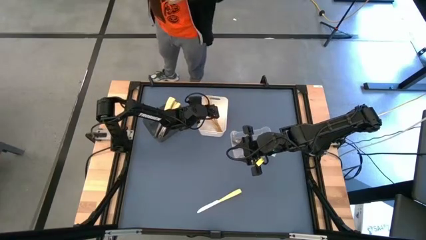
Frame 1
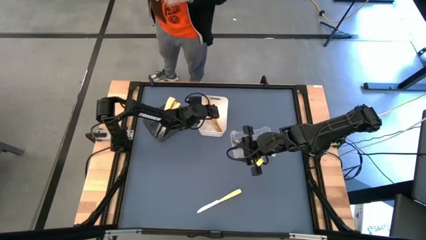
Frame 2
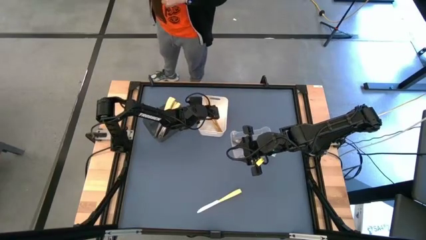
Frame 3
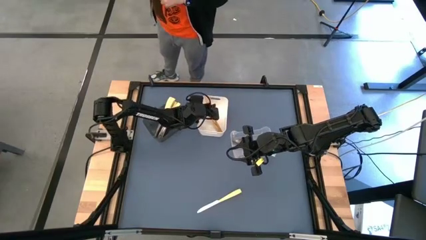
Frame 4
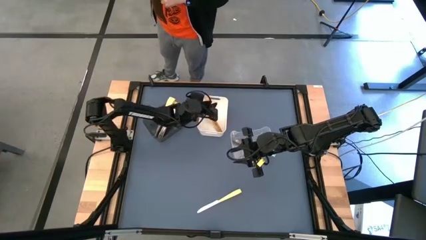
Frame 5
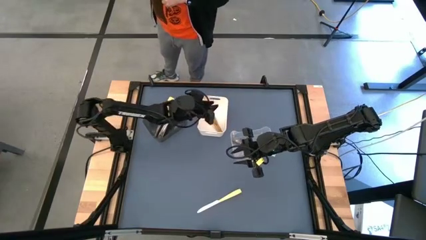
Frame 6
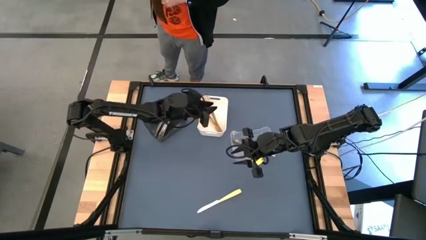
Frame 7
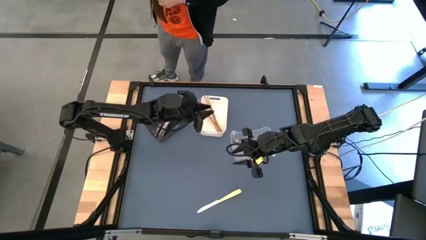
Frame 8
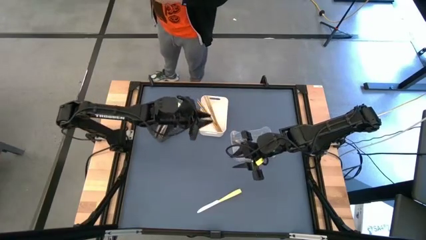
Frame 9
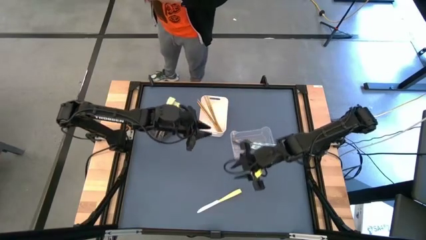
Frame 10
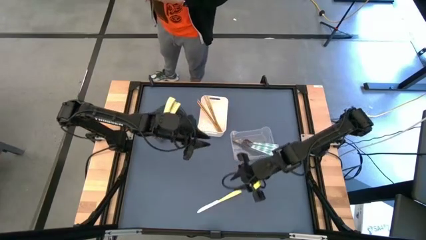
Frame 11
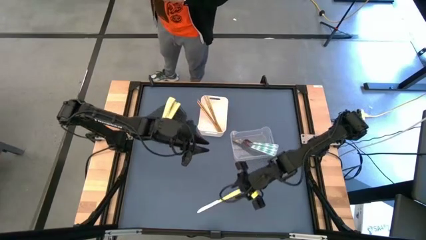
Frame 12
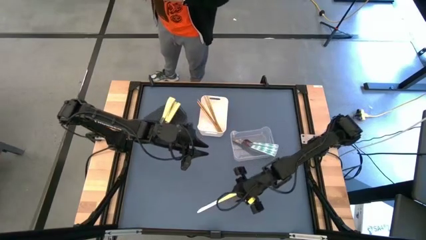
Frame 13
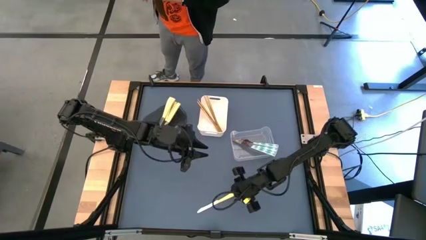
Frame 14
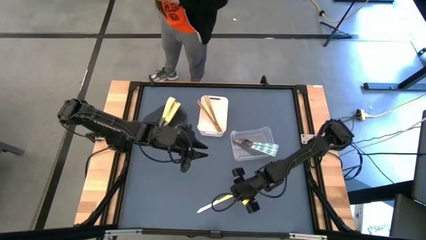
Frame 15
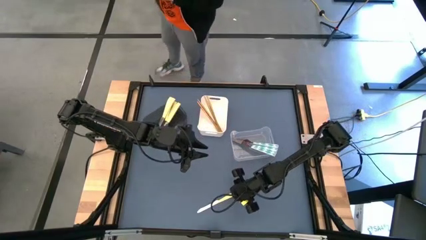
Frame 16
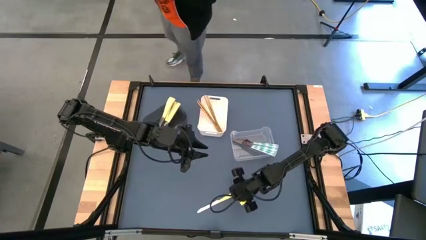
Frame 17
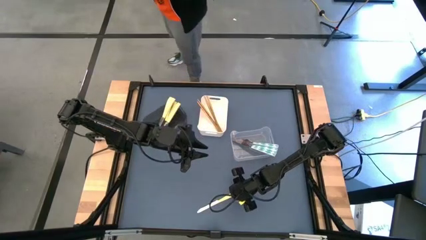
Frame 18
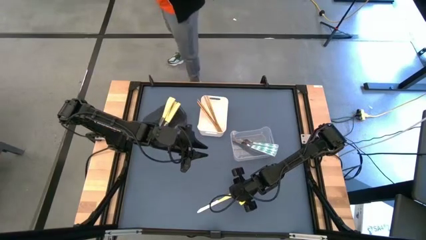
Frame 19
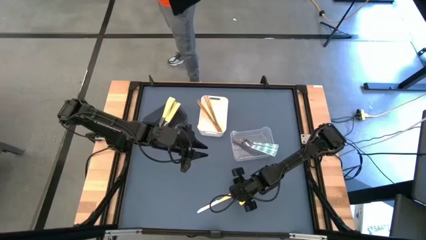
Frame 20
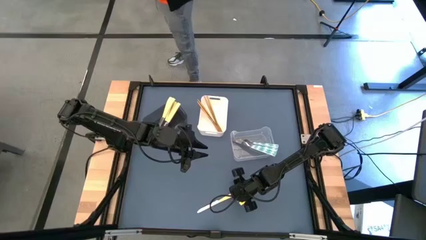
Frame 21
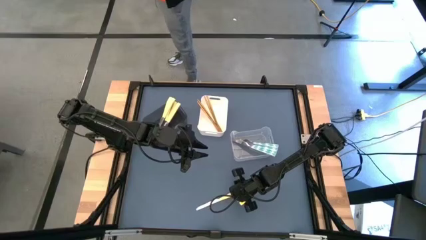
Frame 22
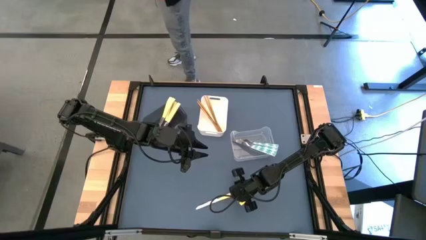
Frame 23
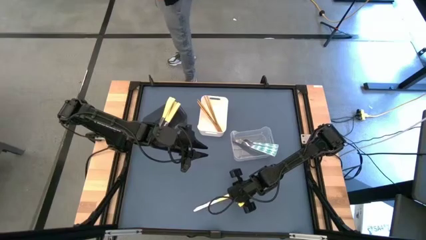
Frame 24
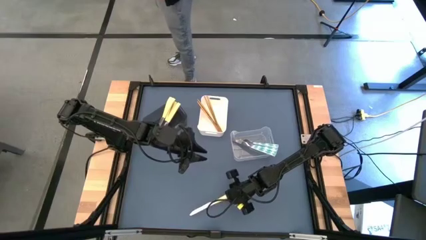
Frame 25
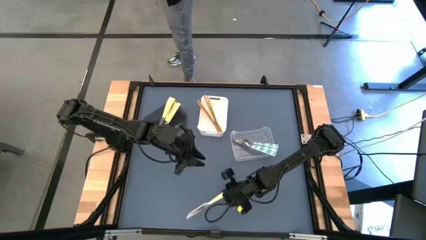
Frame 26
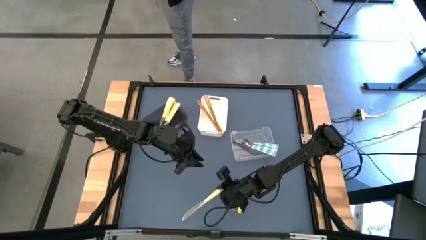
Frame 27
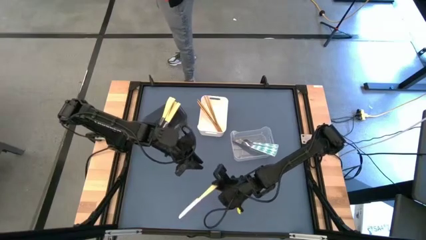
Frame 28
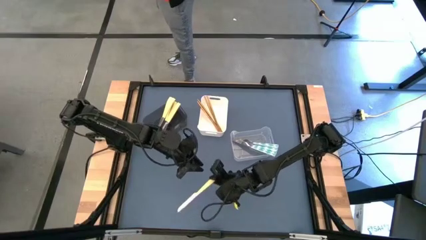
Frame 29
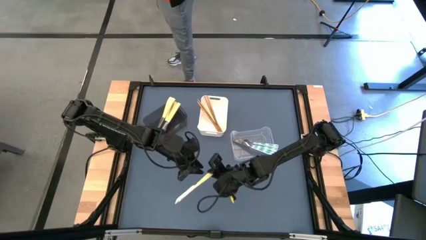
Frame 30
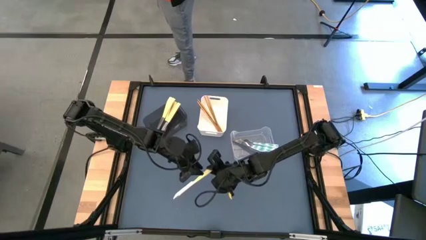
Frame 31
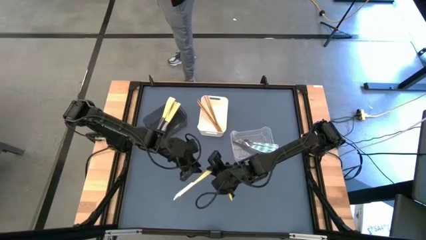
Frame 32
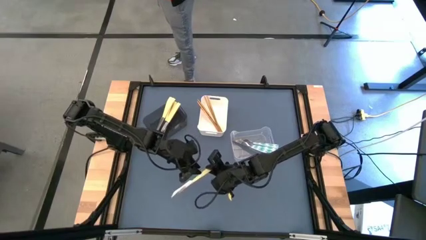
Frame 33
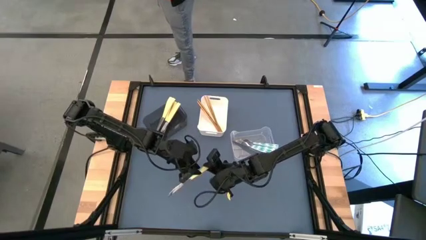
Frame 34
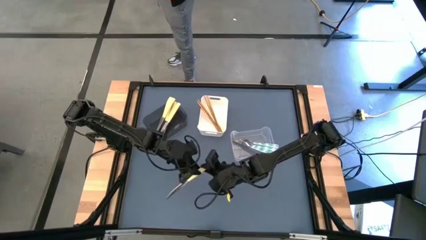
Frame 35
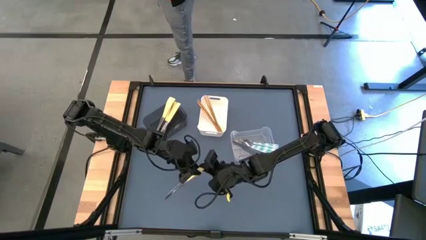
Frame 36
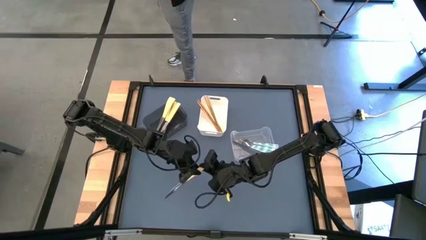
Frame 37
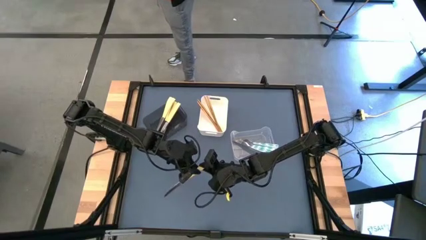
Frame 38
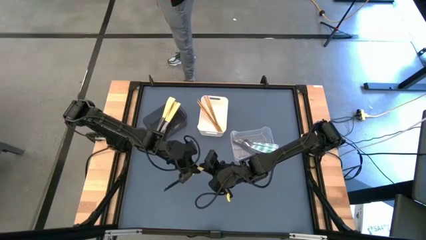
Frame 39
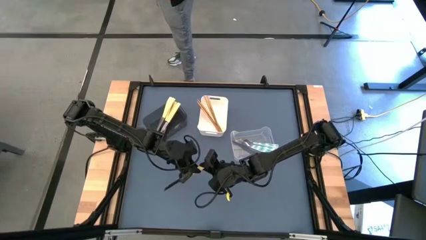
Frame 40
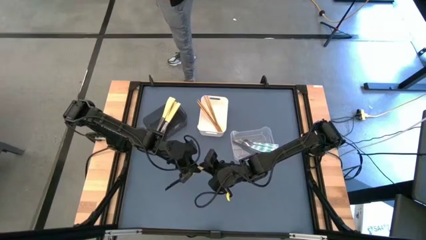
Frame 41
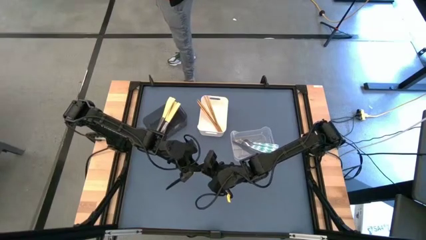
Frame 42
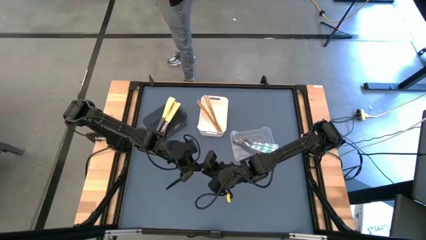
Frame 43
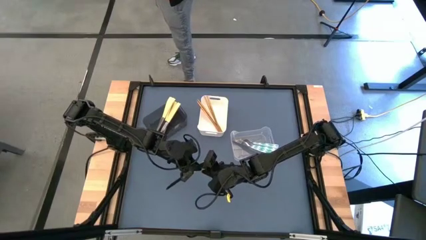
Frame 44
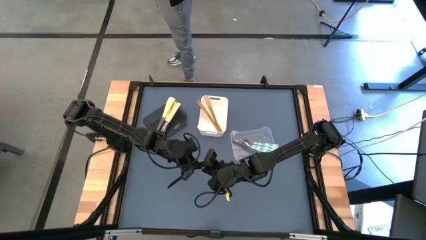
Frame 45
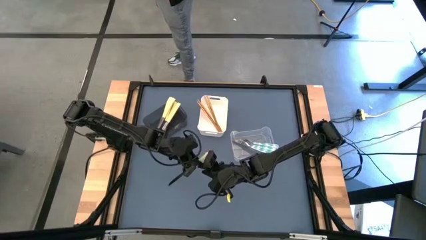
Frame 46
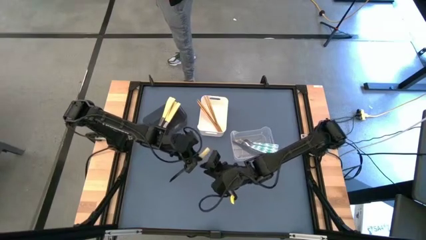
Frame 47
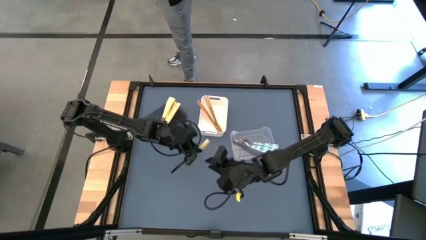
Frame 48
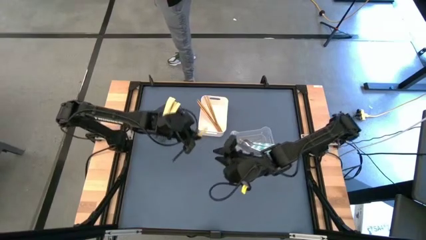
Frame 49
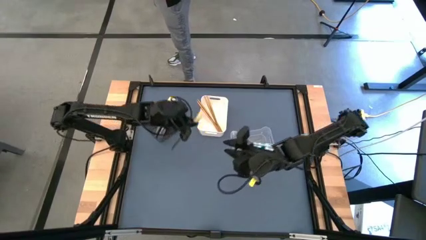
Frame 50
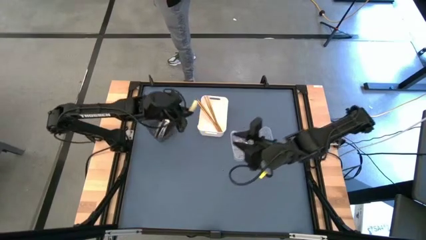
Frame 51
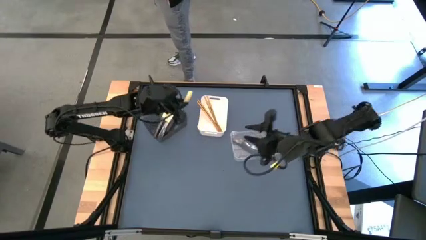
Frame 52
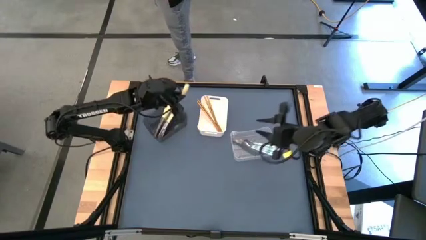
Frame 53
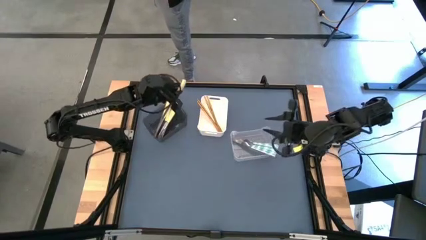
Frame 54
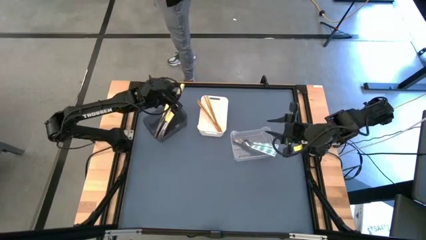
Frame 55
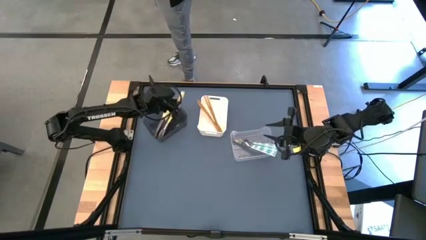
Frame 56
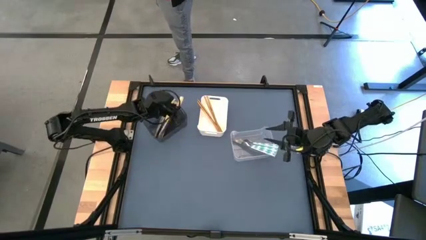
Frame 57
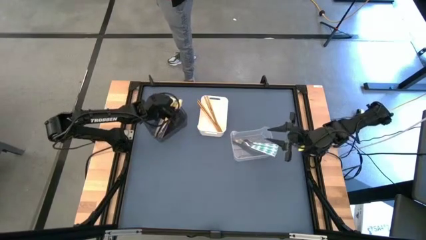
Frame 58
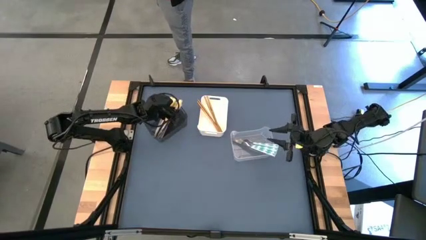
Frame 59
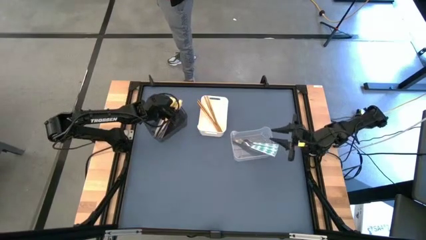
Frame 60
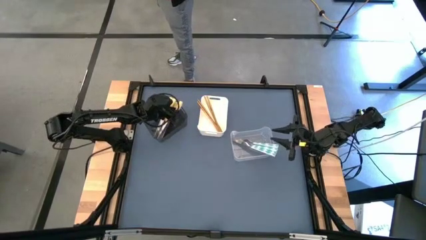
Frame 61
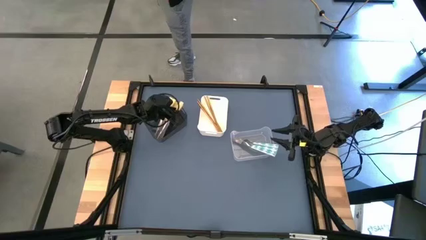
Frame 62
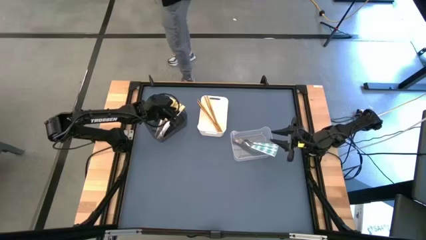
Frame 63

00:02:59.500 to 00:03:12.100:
Task: Sort silverware by color (type)
Put the yellow knife into the black bin

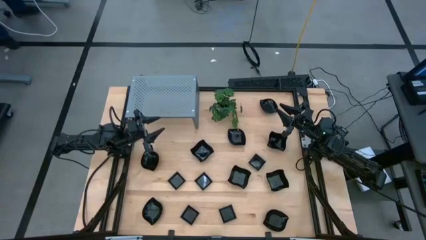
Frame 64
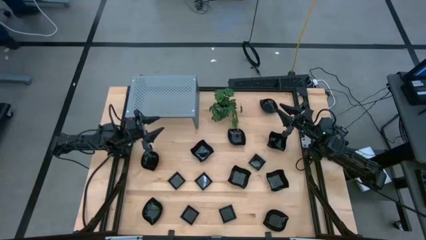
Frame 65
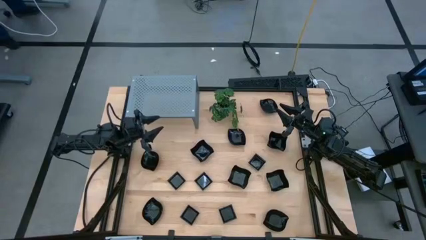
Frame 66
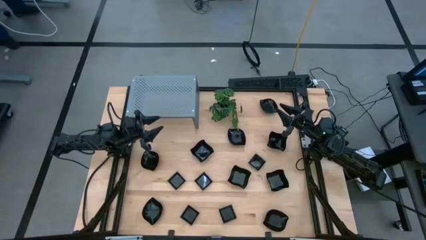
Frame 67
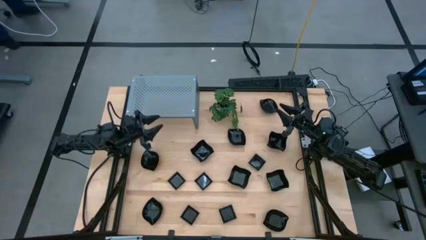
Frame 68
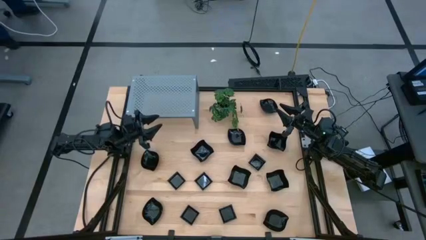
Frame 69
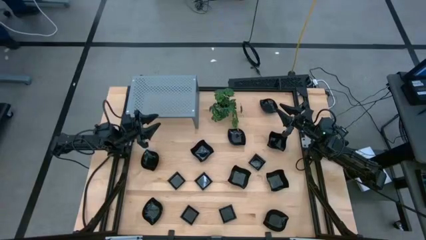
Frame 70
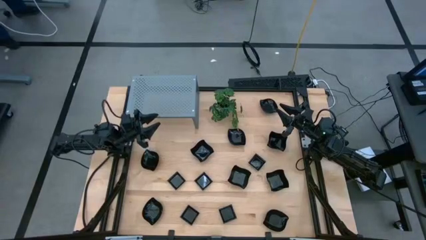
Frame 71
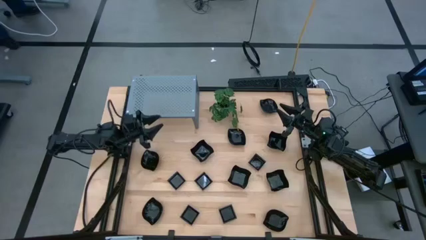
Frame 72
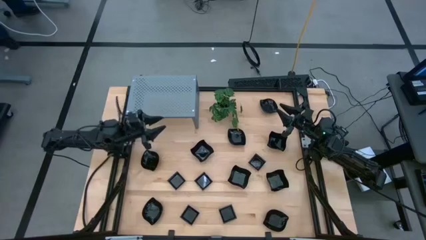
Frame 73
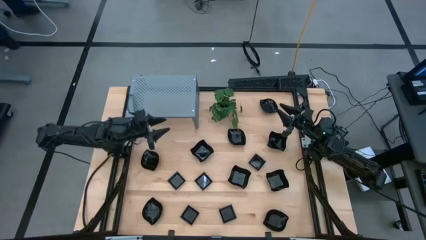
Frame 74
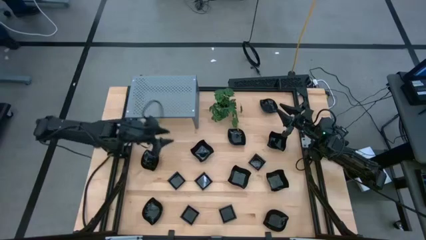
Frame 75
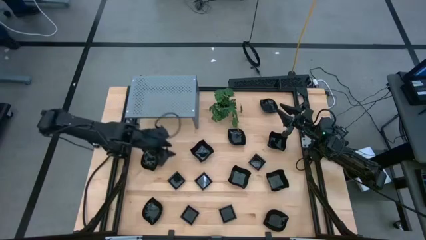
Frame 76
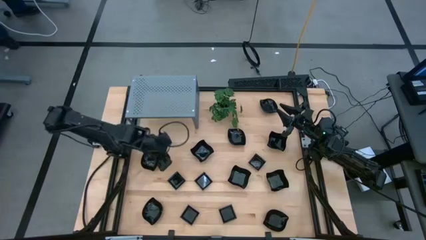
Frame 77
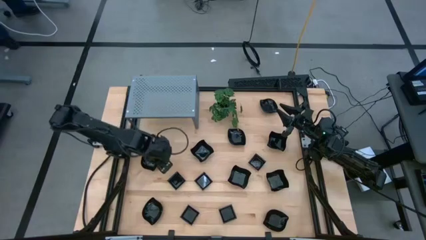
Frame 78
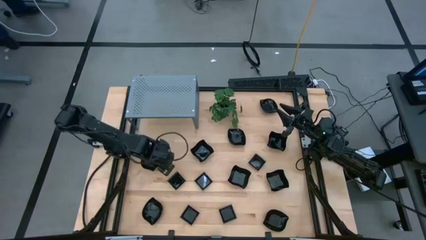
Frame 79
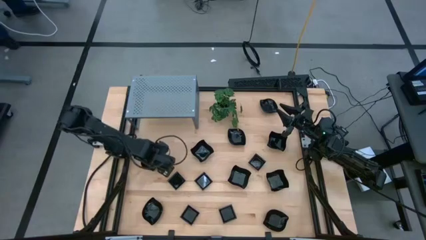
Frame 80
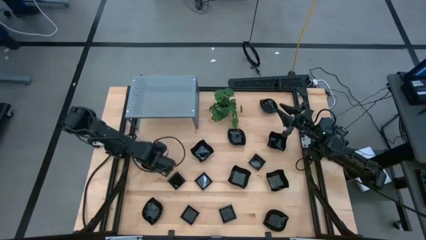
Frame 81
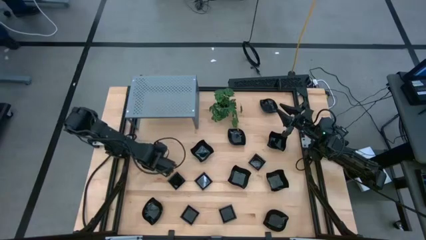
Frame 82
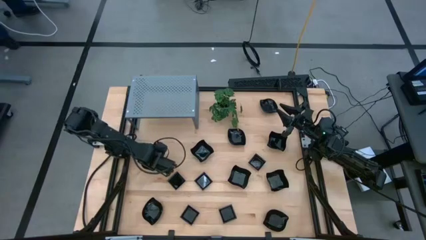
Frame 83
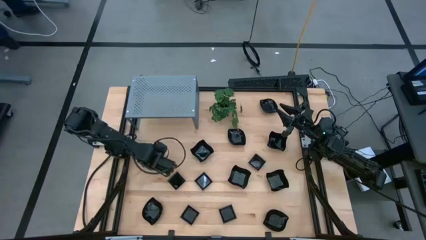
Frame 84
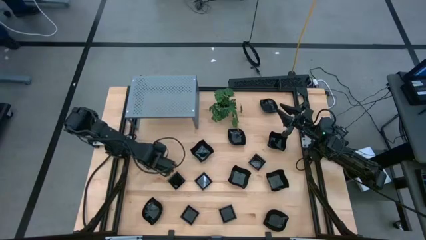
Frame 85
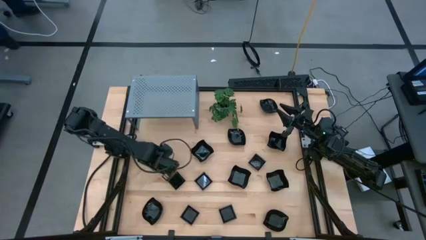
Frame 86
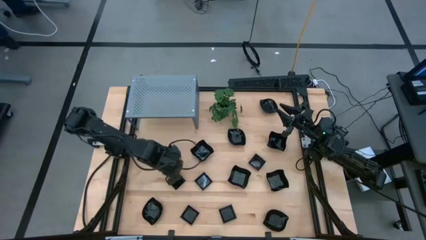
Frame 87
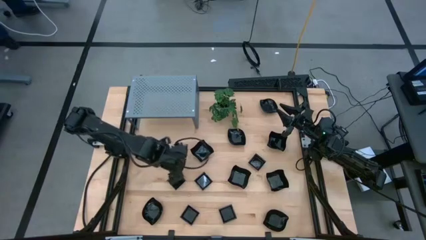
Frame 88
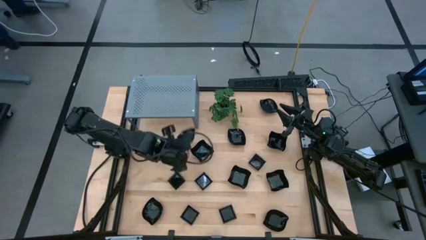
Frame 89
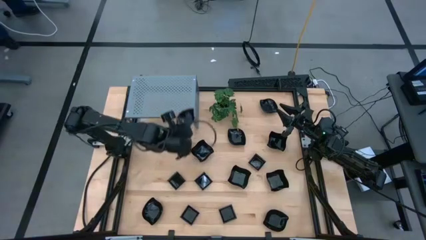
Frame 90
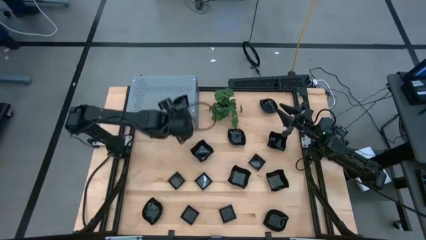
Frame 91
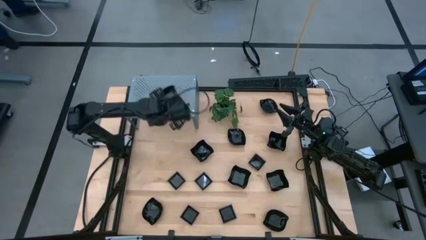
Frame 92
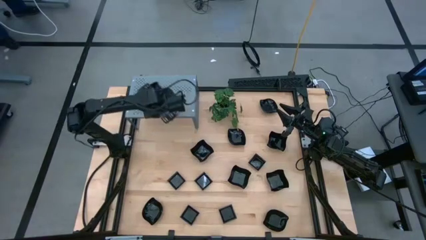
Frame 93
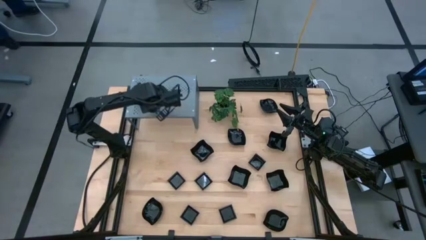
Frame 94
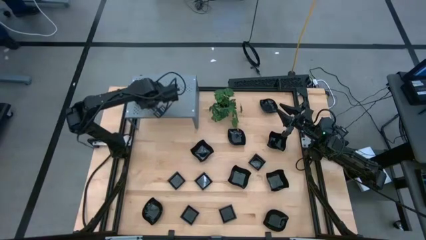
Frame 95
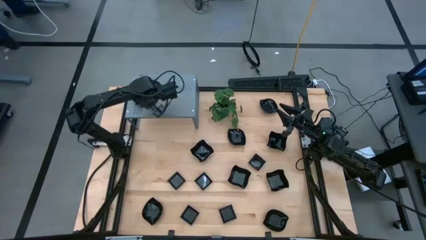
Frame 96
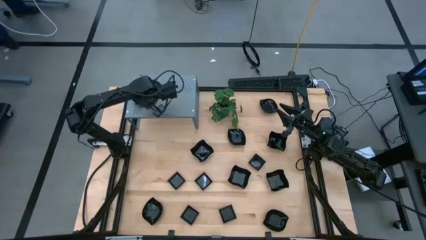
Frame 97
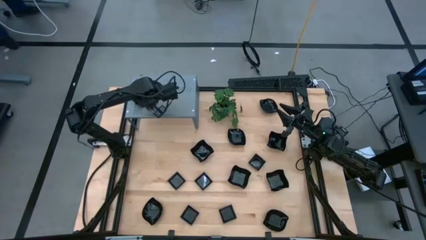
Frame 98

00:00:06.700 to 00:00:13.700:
Task: Pick & Place Mini shaped plates
Put the black leaf shape plate on the shelf
